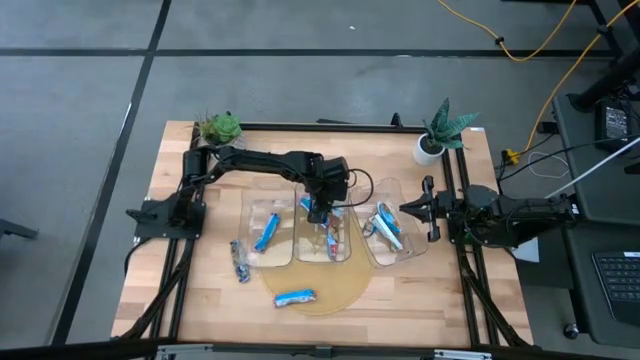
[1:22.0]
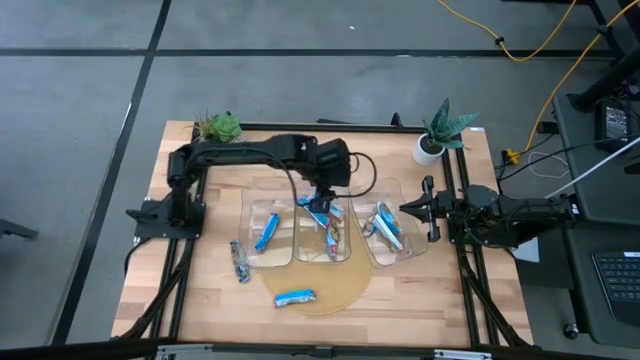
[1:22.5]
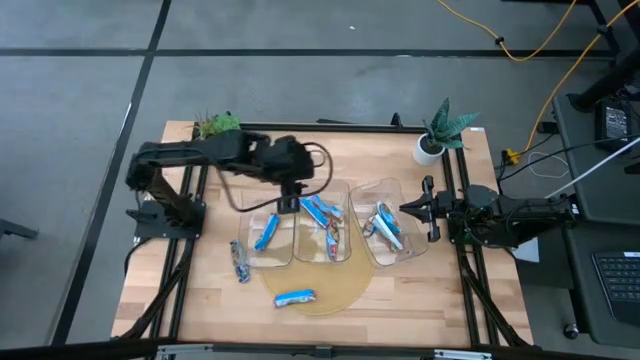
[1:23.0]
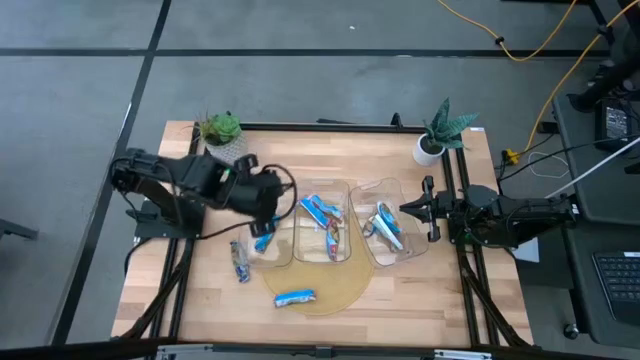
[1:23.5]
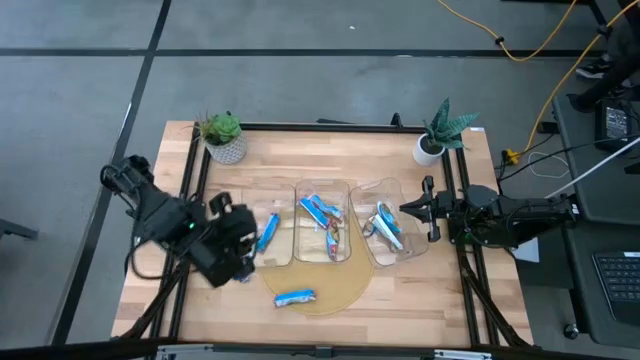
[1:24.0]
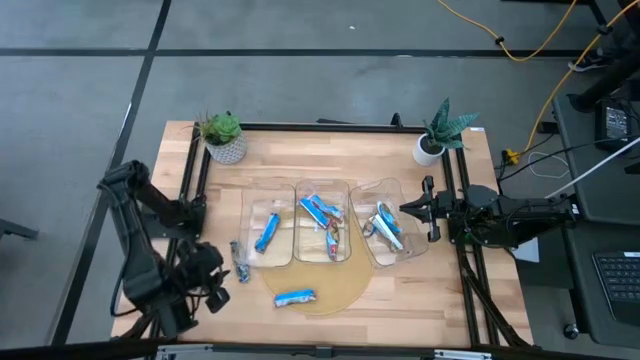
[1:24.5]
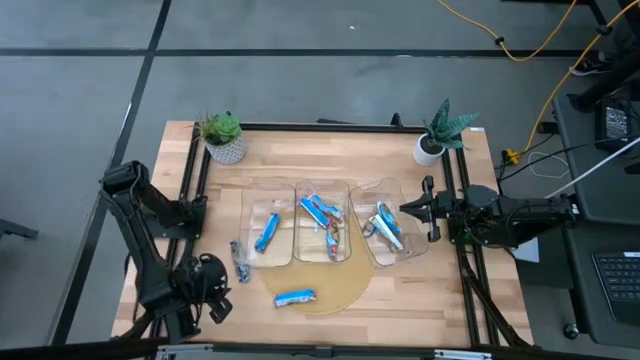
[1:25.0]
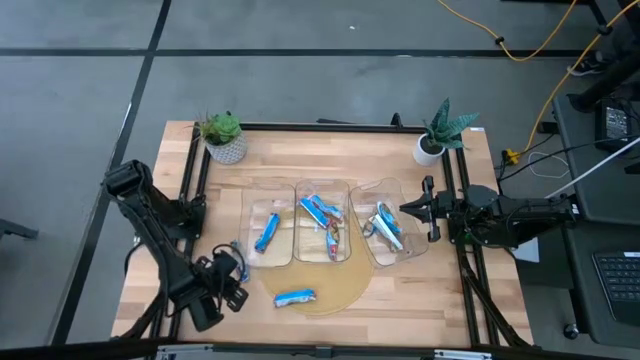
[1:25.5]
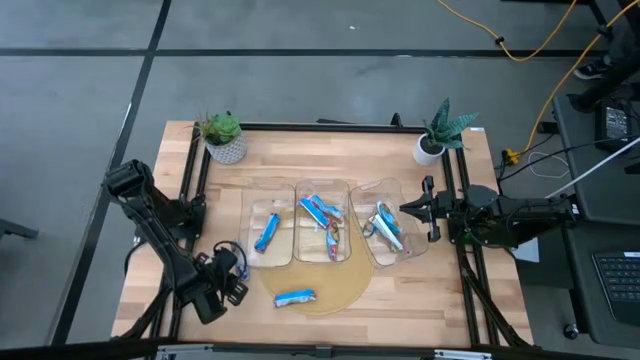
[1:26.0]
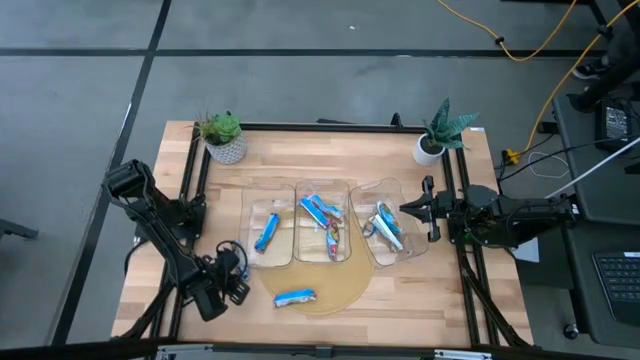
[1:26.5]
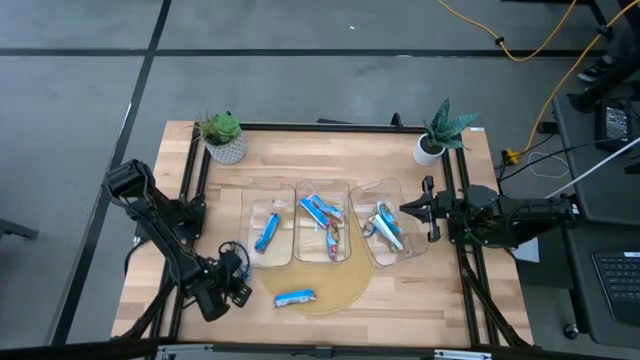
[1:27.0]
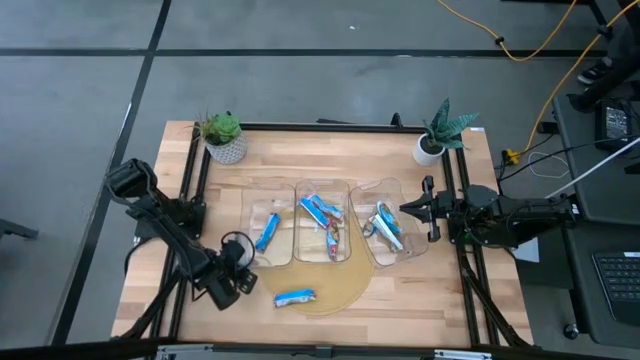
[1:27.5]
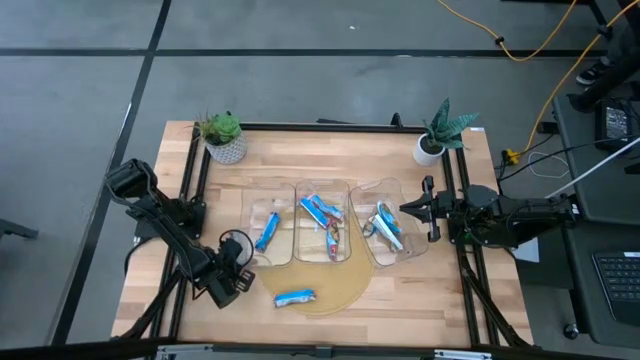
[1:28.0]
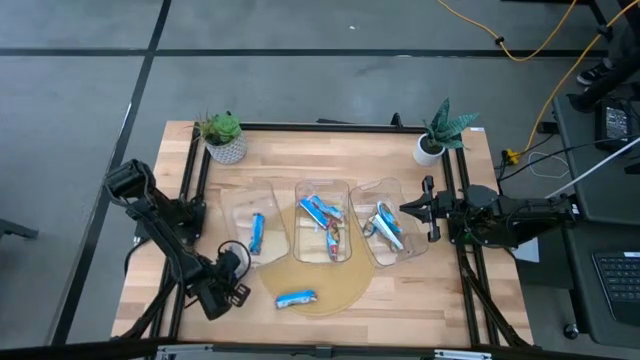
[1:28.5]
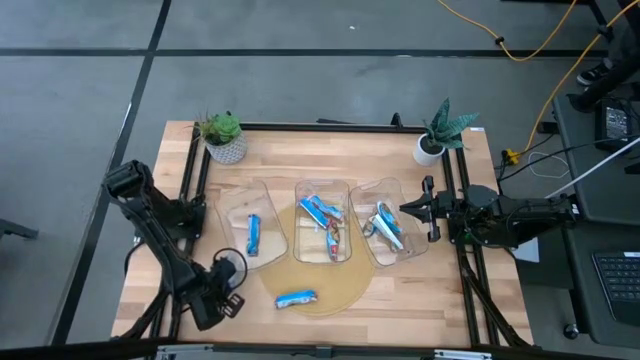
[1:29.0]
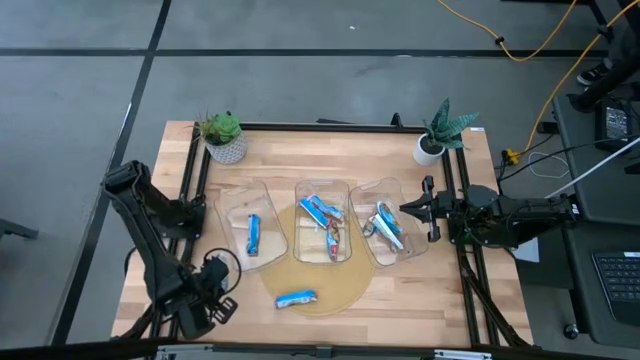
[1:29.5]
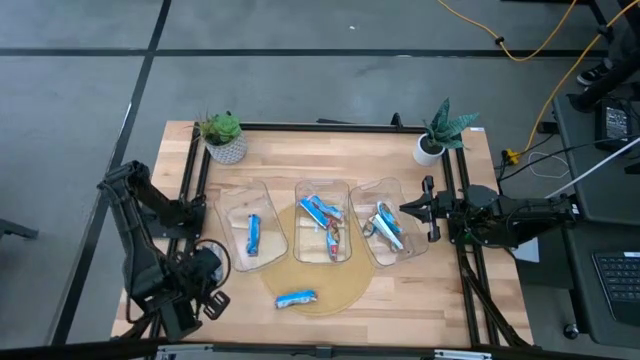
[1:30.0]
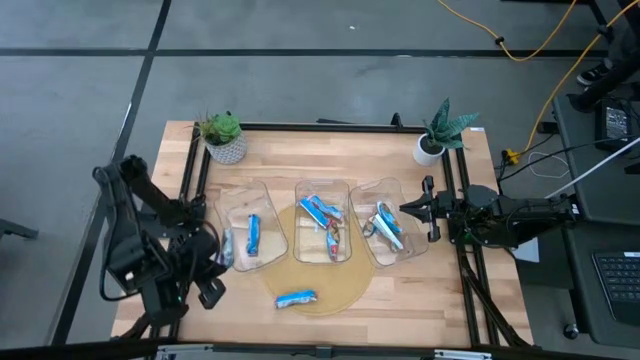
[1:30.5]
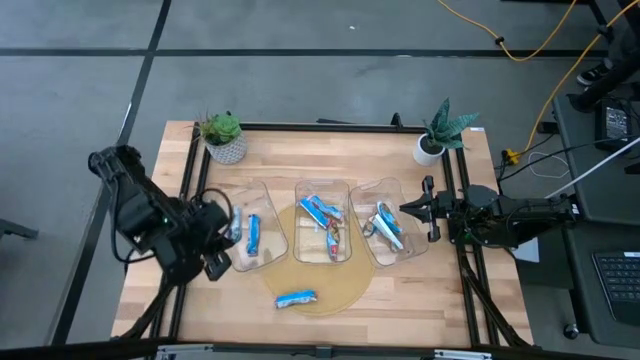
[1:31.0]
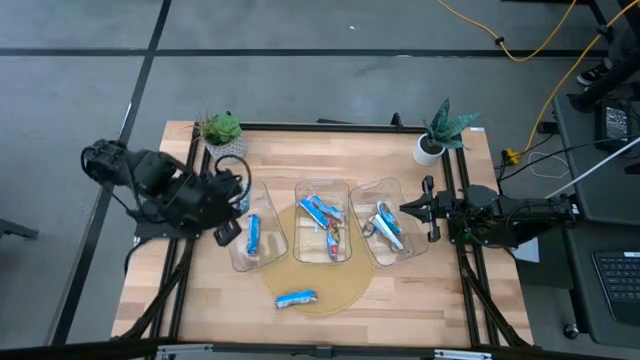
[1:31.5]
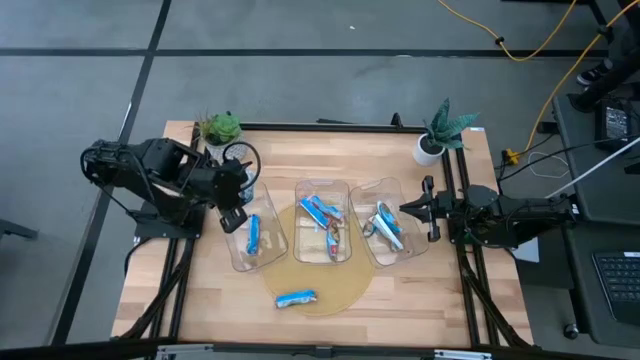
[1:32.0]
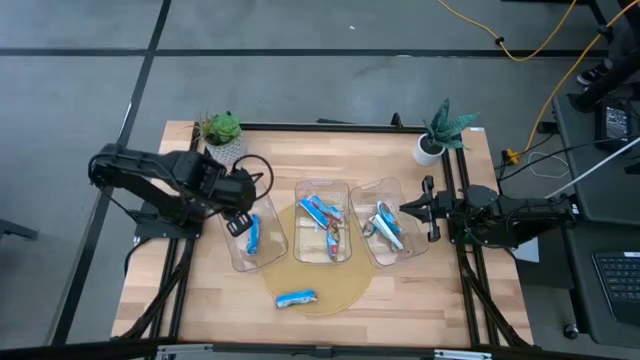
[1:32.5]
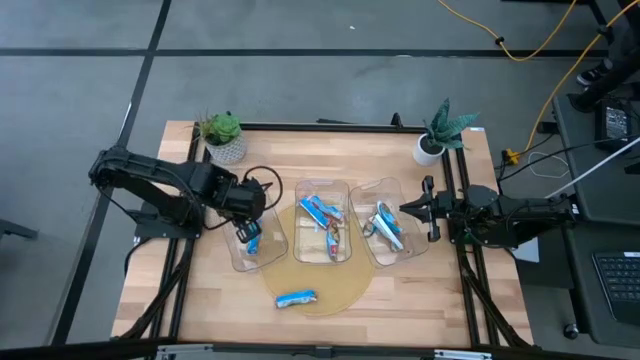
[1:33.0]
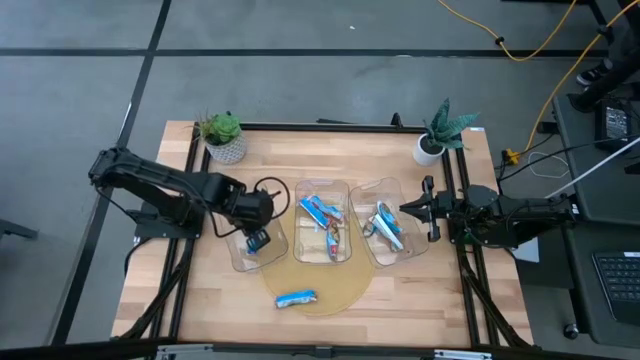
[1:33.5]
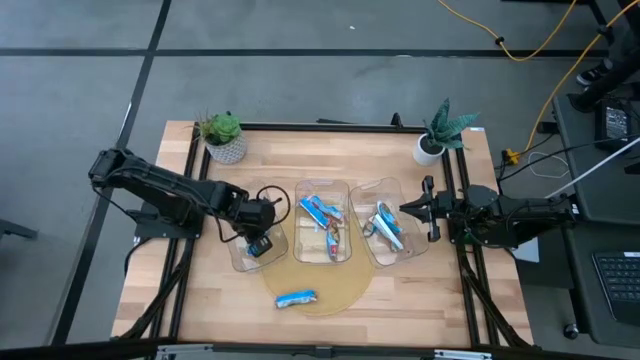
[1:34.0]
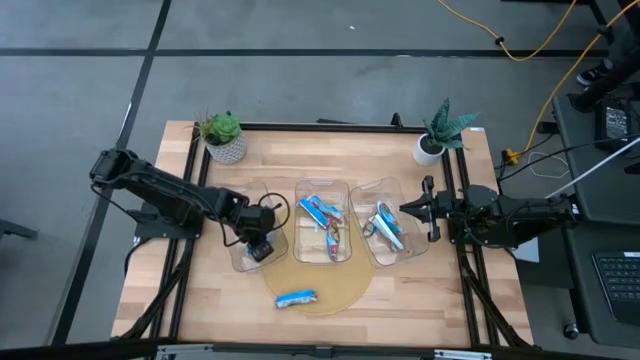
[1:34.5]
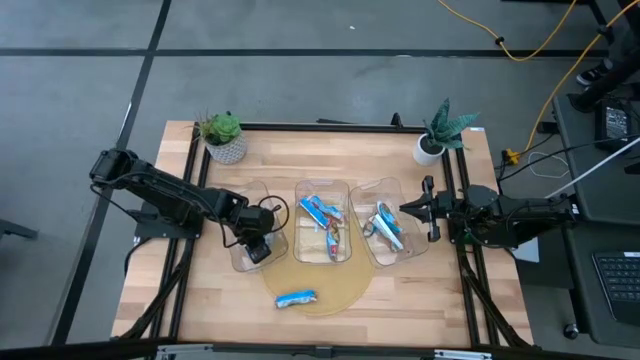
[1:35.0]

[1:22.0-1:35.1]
Task: Pick and place Granola Bars by type
Put the blue granola bar into the left transparent bin

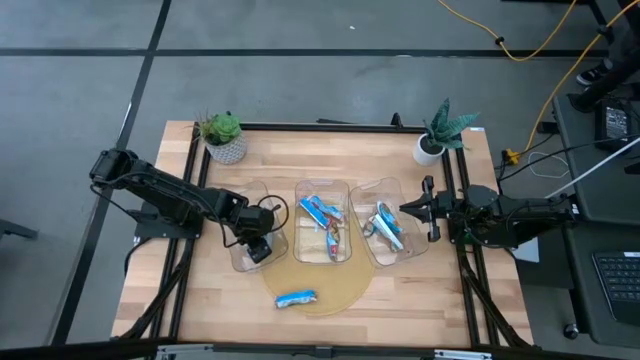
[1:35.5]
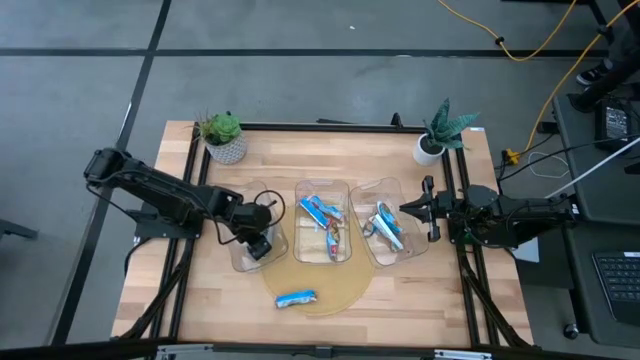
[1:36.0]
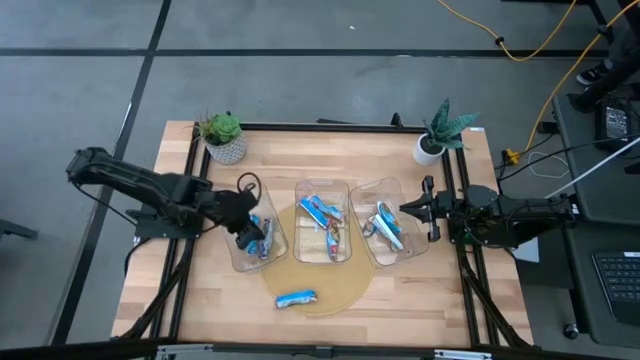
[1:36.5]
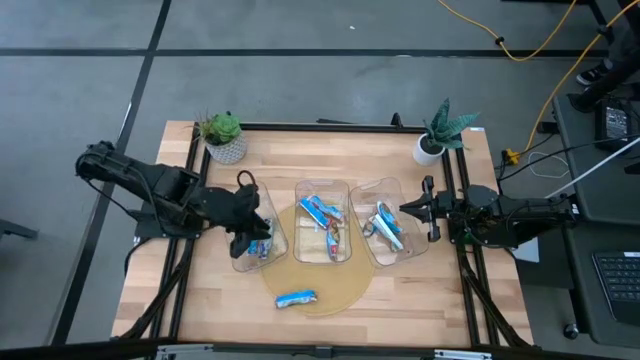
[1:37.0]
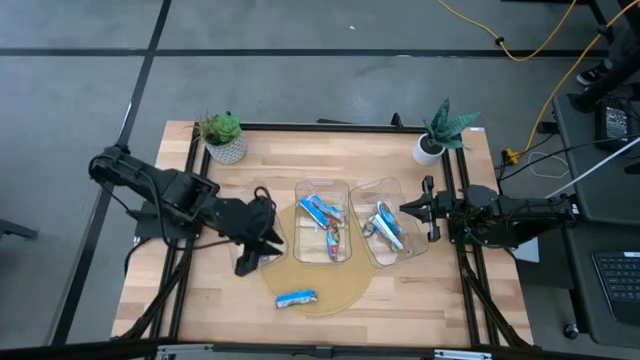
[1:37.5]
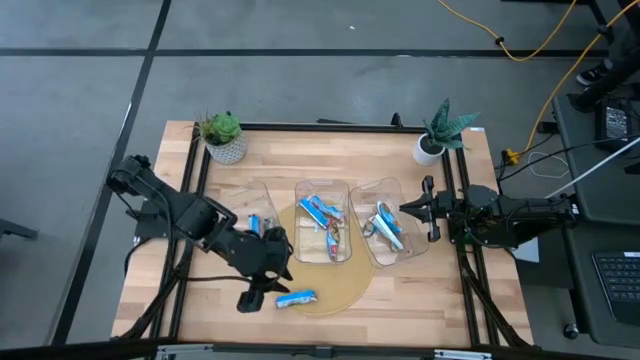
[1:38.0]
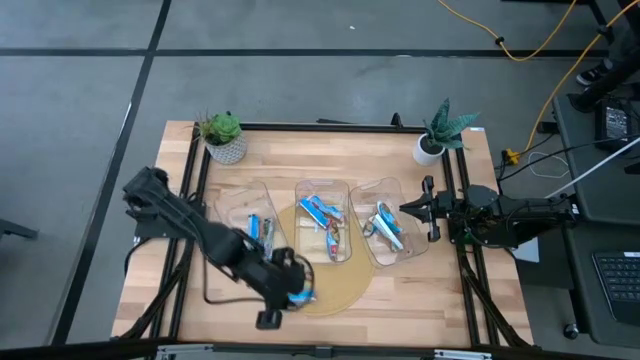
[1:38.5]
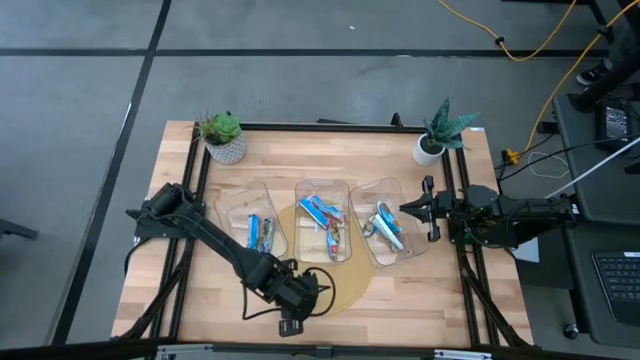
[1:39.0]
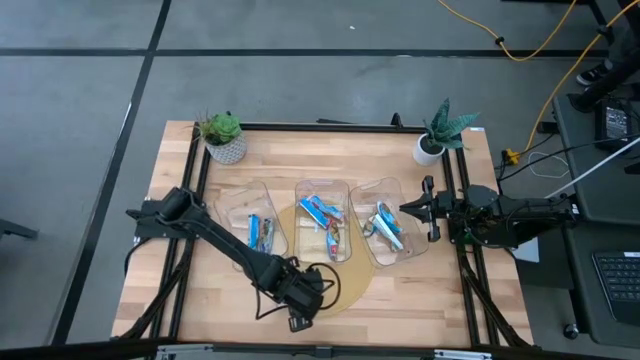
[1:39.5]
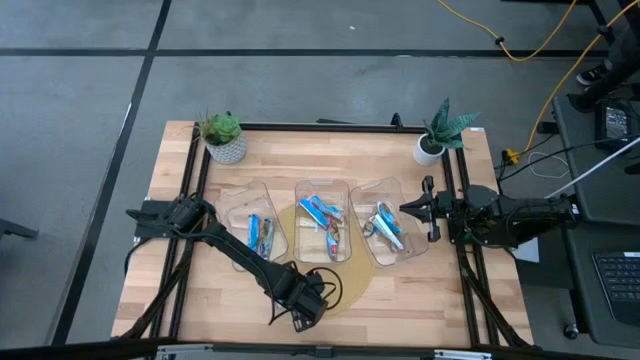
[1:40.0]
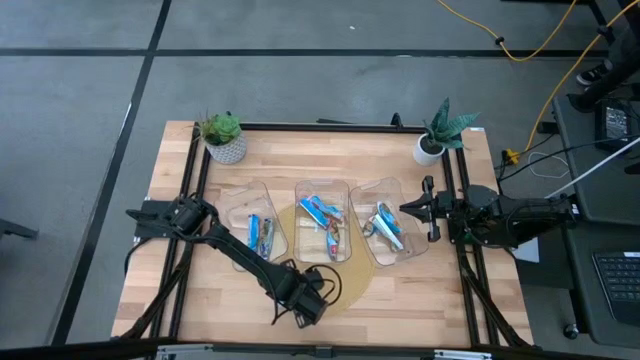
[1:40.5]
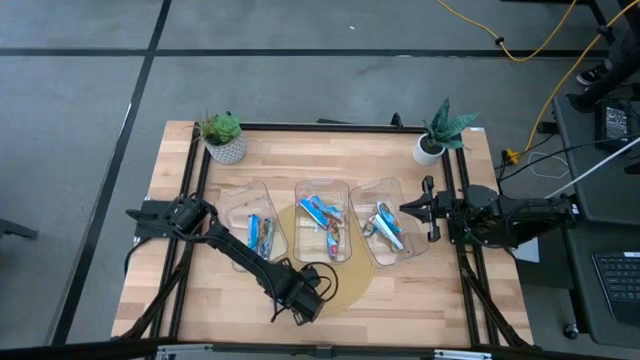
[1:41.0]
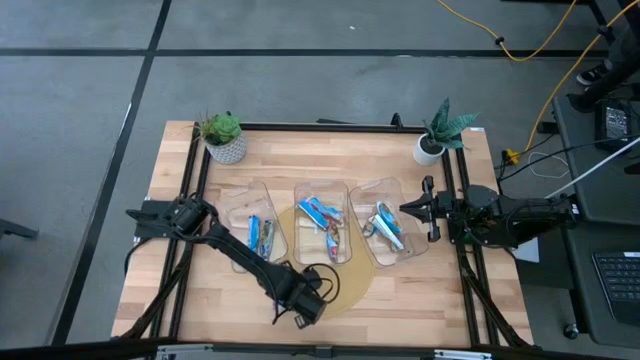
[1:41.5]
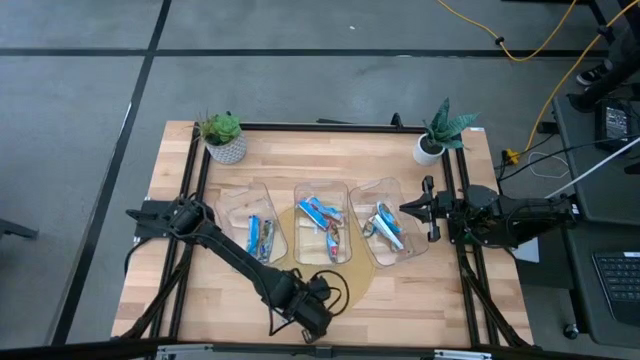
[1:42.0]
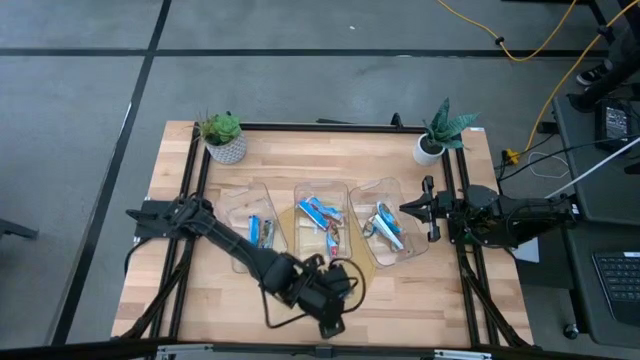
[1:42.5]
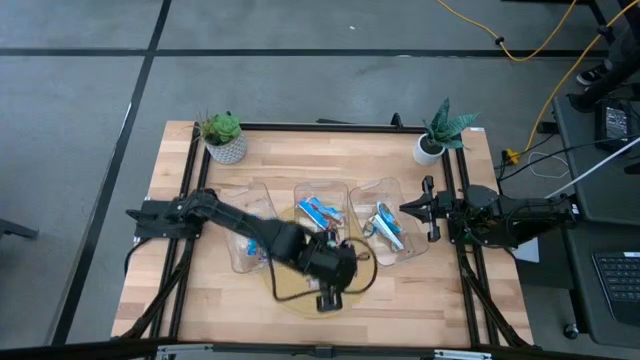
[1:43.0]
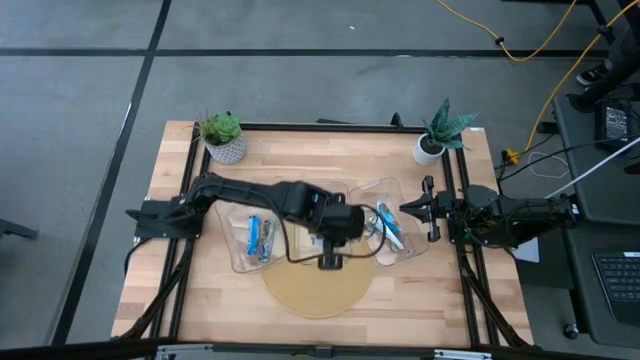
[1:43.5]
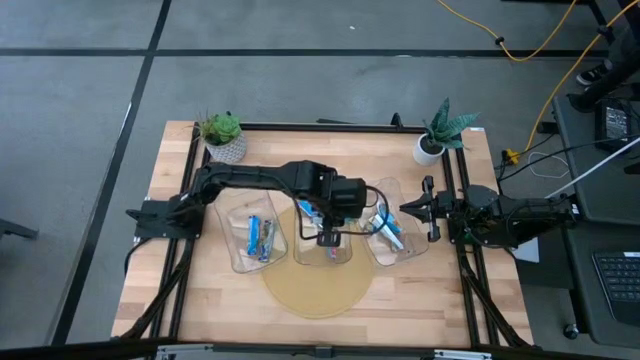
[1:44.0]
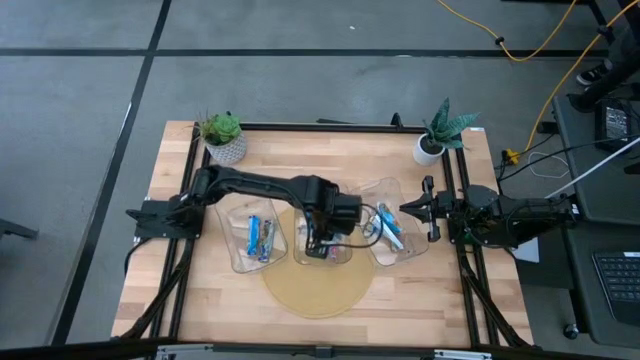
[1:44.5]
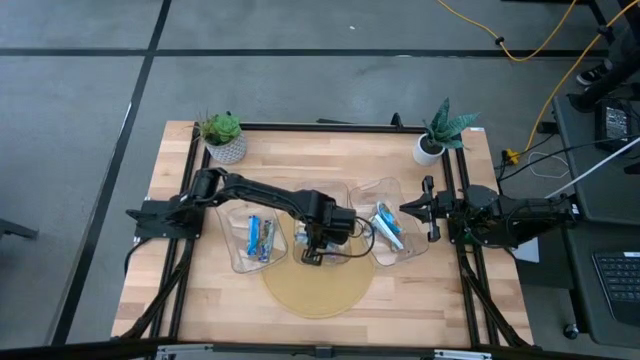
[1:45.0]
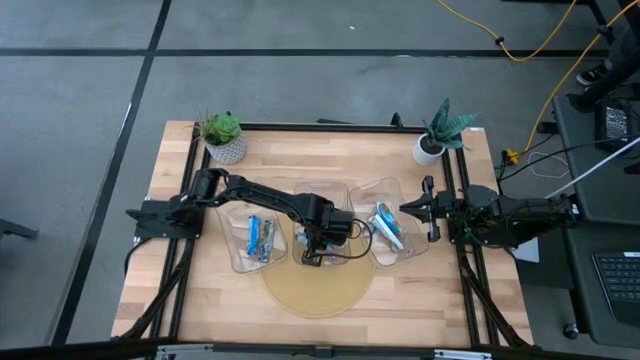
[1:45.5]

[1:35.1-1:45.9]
Put the red granola bar into the middle transparent bin
